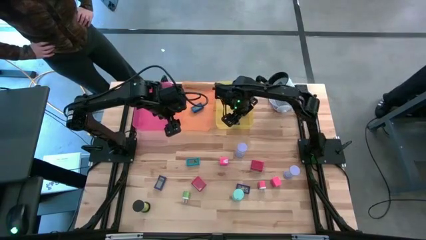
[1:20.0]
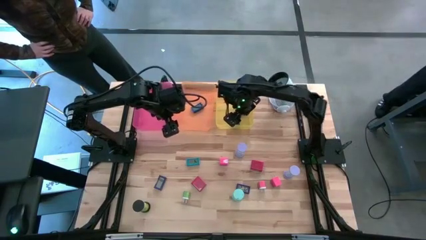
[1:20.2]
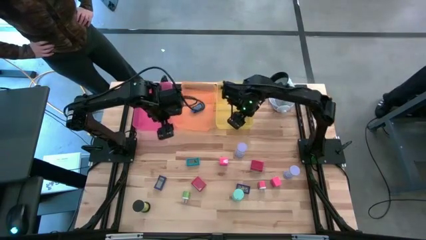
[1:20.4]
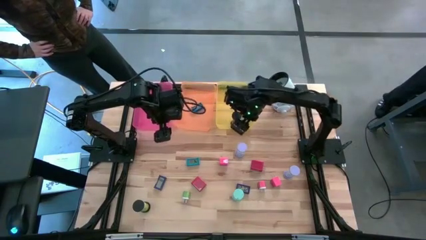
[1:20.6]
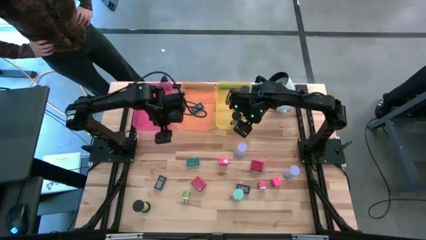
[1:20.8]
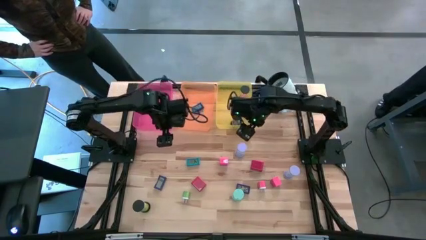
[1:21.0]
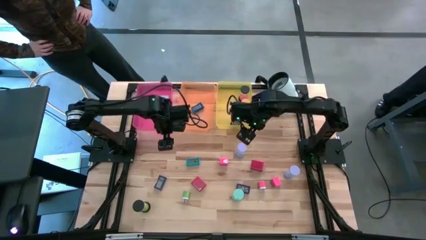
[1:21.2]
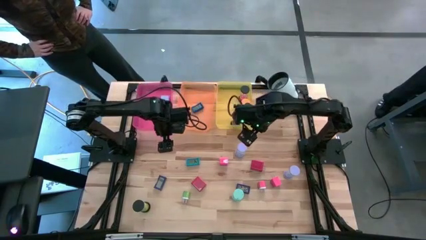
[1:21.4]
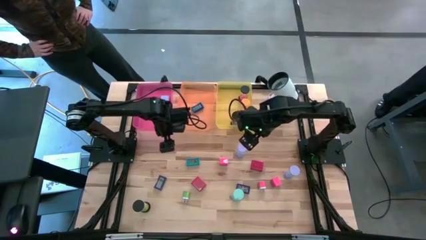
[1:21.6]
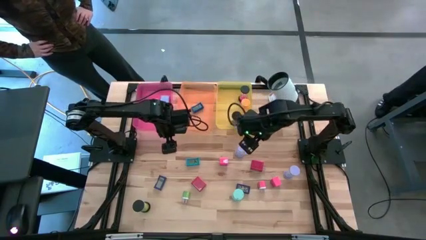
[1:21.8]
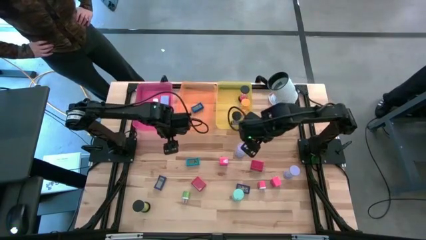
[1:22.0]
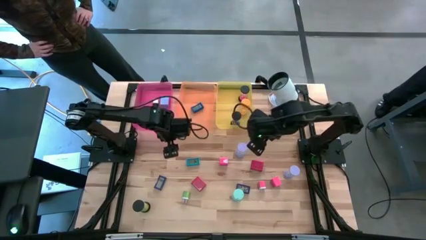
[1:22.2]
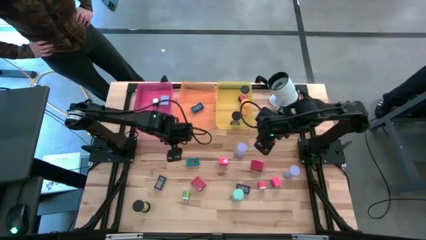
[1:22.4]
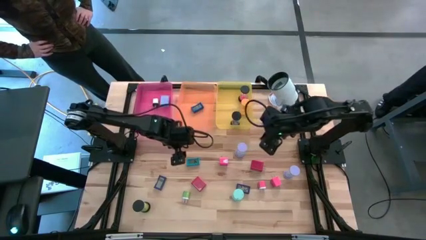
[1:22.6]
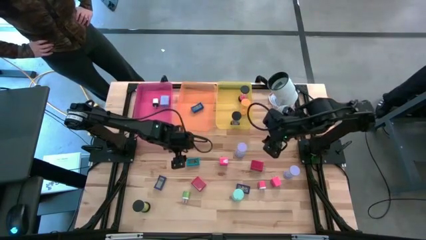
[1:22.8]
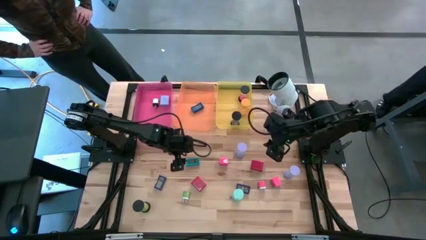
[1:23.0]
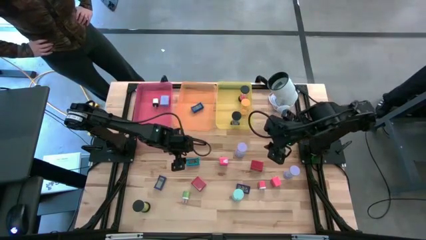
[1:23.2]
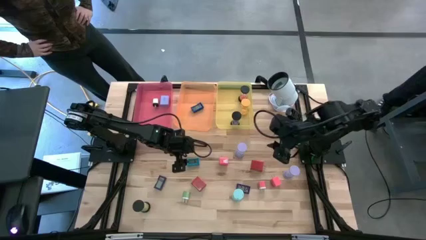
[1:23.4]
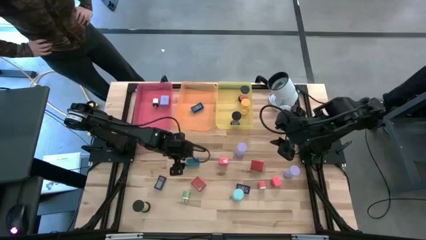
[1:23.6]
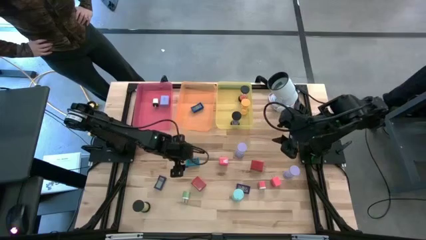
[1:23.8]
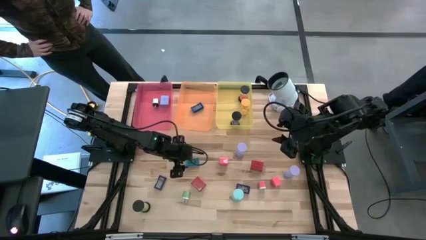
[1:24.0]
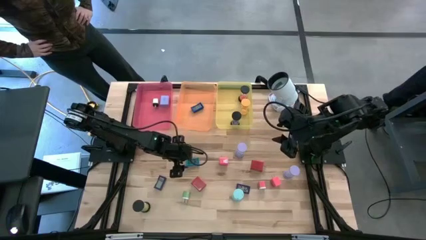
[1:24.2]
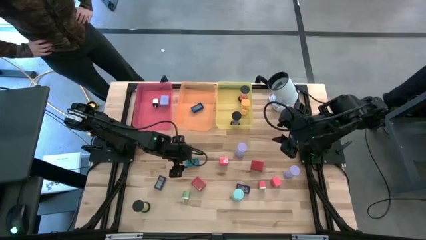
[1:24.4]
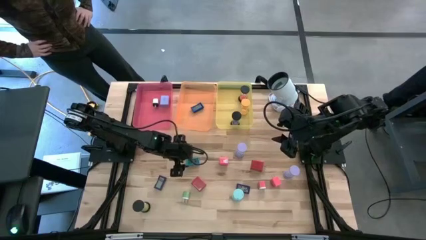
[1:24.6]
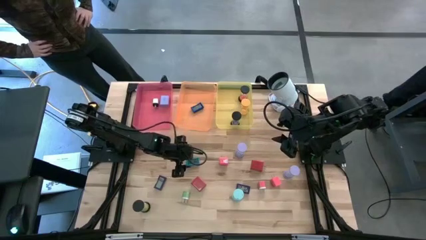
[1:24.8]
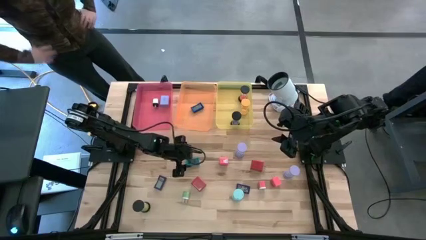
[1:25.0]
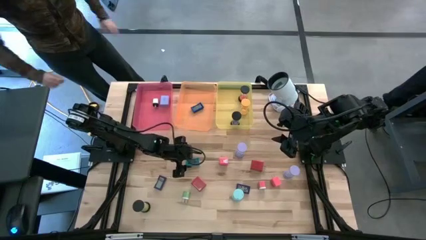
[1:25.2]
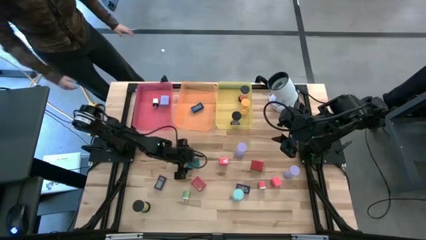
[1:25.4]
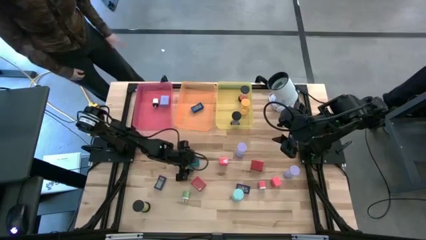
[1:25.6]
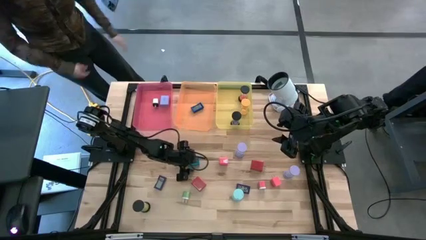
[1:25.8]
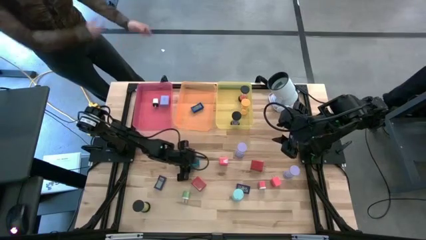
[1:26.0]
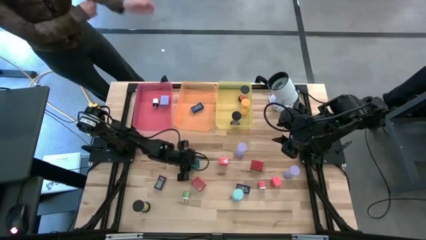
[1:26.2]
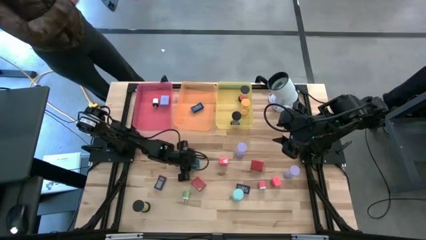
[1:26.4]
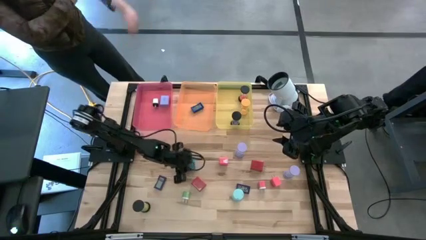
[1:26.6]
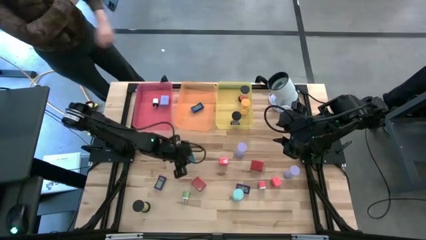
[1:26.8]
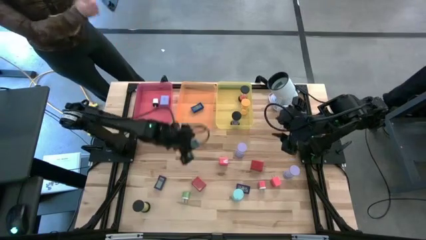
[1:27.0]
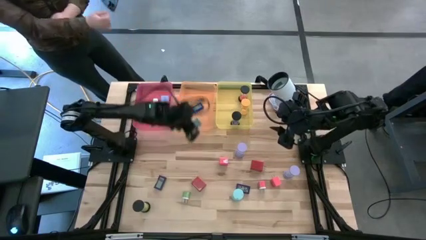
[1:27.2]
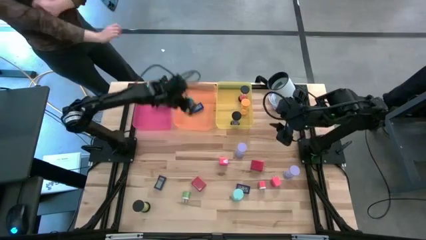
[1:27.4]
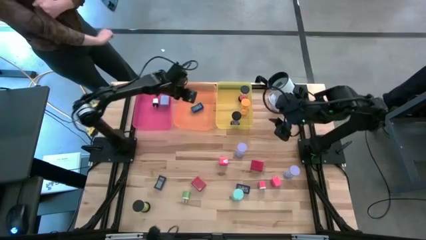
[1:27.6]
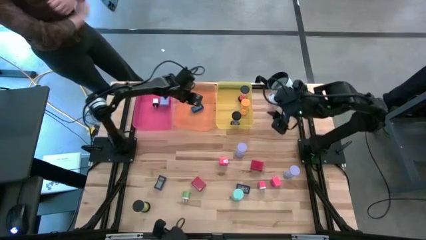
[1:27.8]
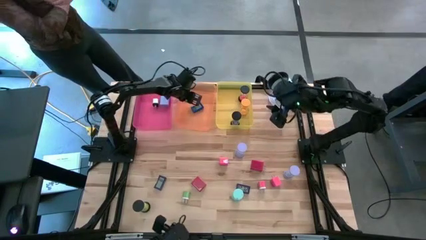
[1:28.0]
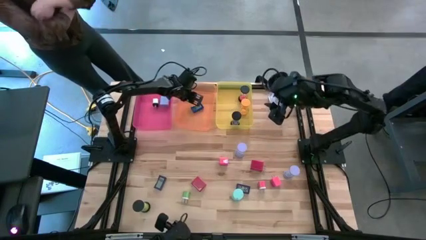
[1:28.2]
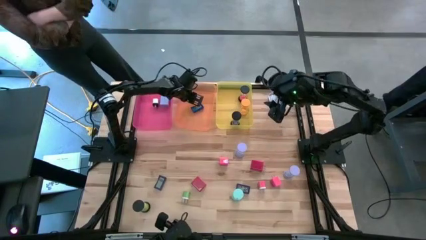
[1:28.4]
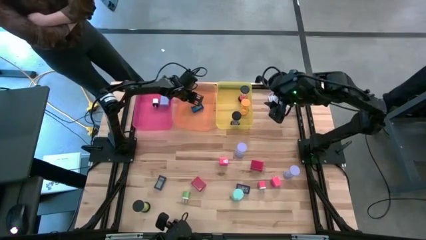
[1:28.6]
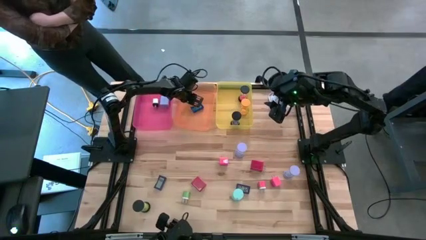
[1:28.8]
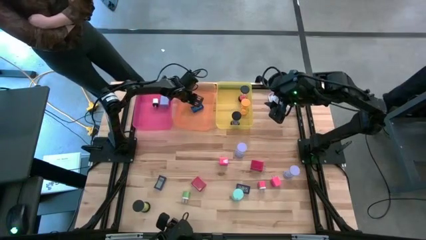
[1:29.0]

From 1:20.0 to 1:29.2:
Task: Pick & Place Office items
Put the light blue digital clock into the orange bin

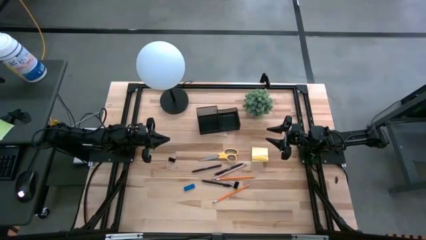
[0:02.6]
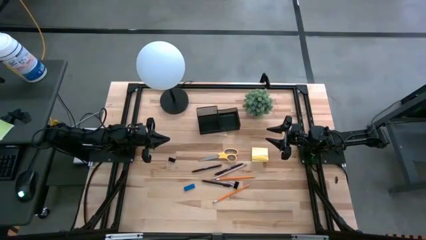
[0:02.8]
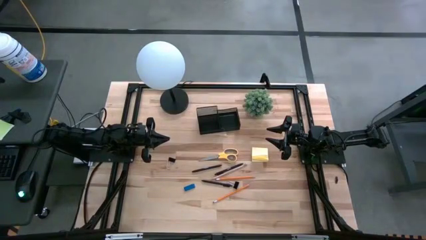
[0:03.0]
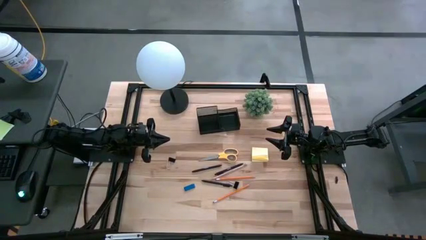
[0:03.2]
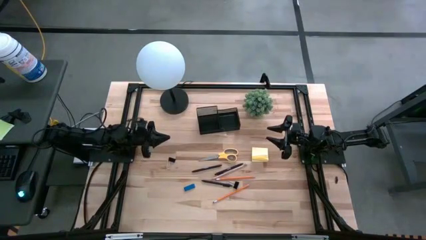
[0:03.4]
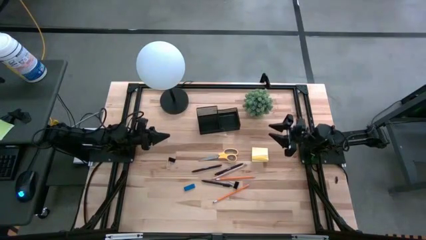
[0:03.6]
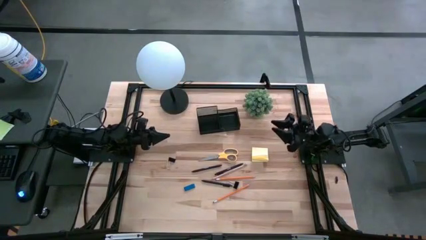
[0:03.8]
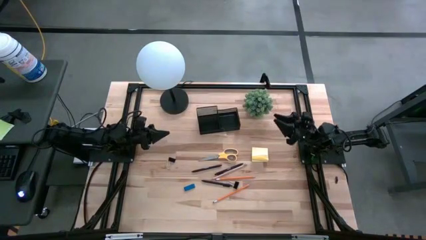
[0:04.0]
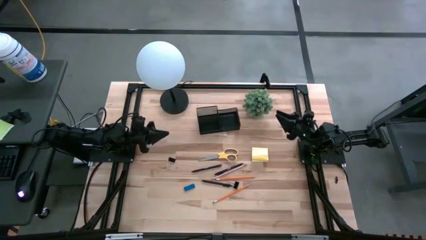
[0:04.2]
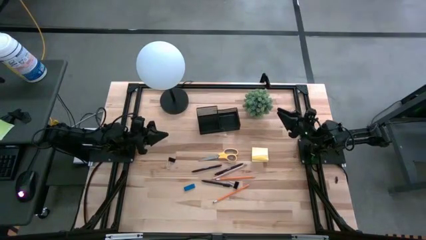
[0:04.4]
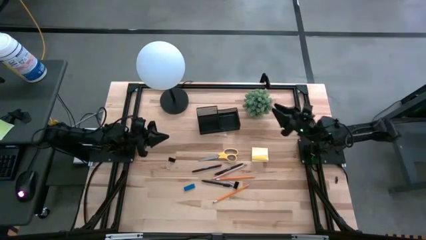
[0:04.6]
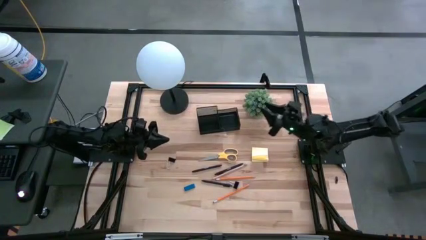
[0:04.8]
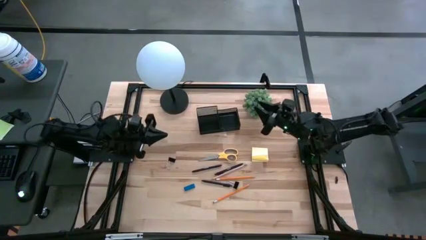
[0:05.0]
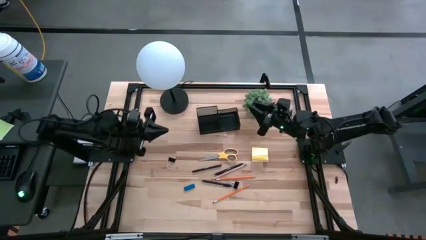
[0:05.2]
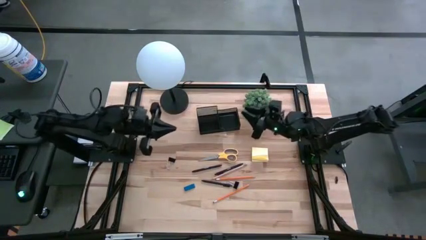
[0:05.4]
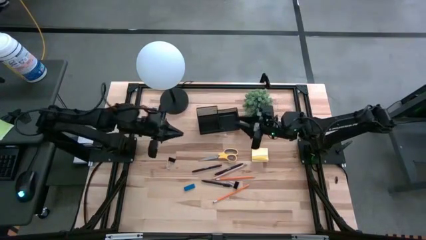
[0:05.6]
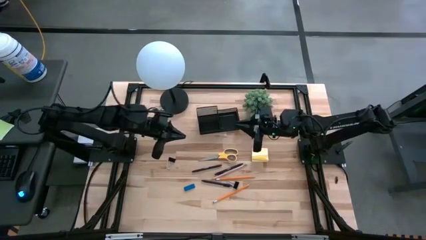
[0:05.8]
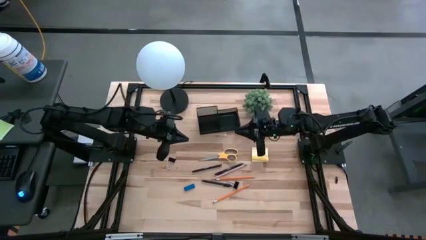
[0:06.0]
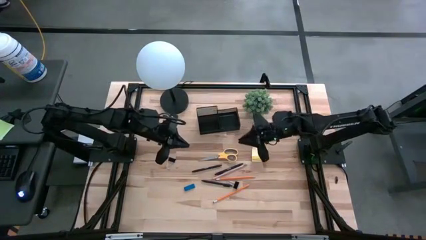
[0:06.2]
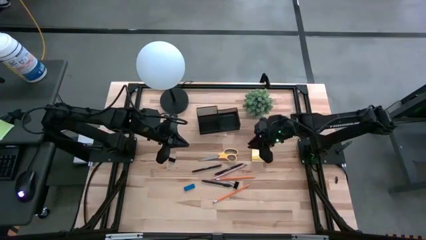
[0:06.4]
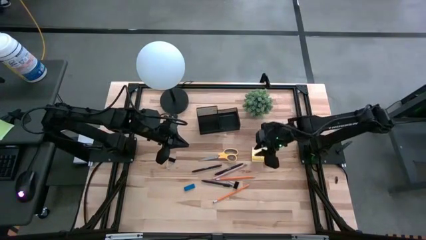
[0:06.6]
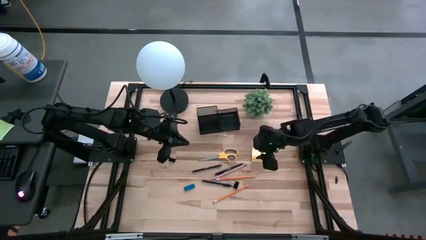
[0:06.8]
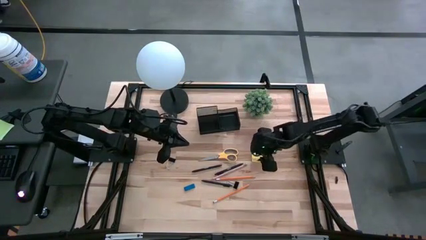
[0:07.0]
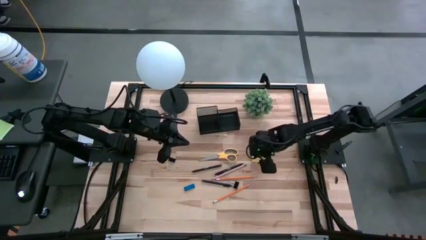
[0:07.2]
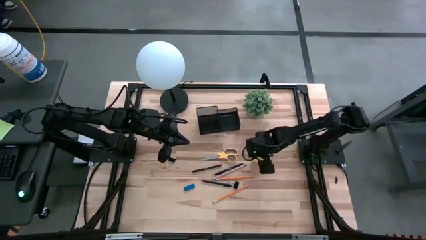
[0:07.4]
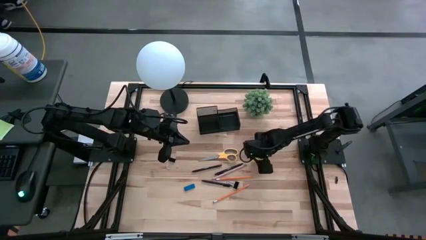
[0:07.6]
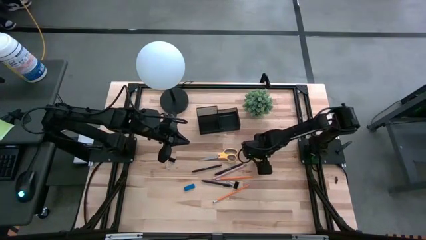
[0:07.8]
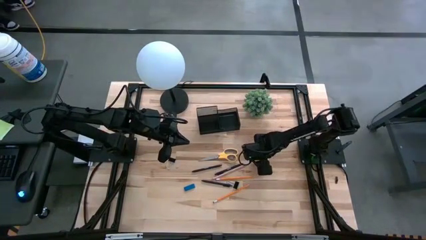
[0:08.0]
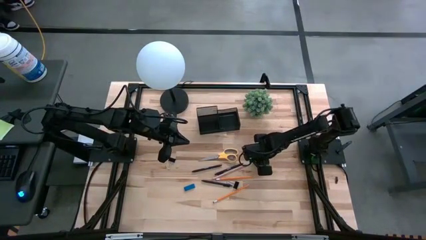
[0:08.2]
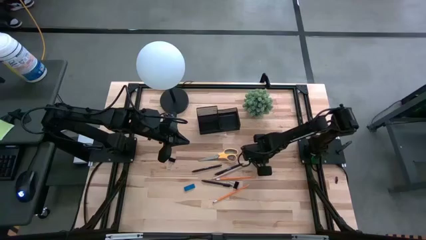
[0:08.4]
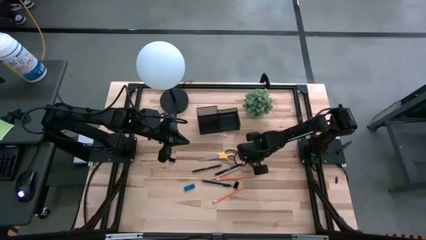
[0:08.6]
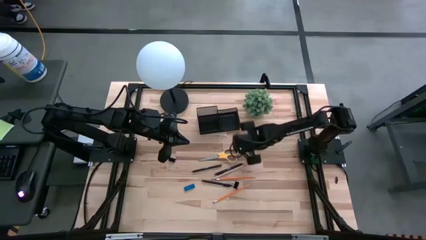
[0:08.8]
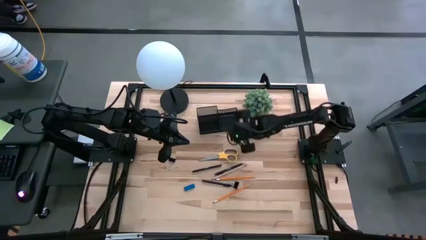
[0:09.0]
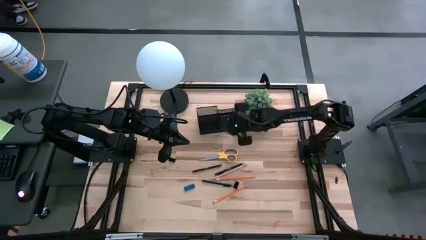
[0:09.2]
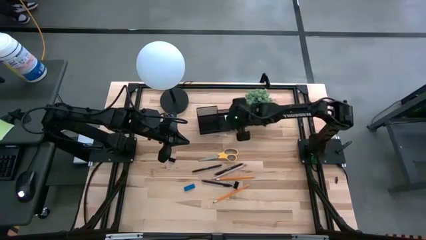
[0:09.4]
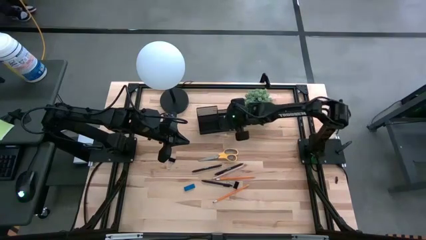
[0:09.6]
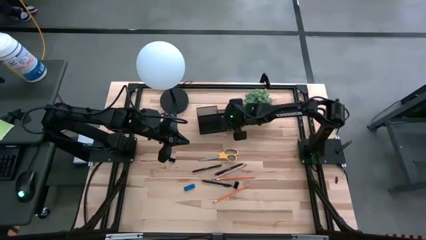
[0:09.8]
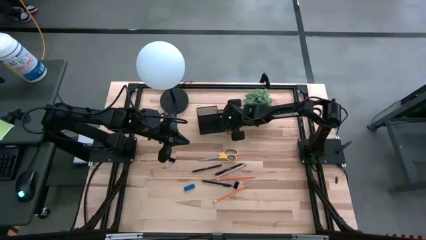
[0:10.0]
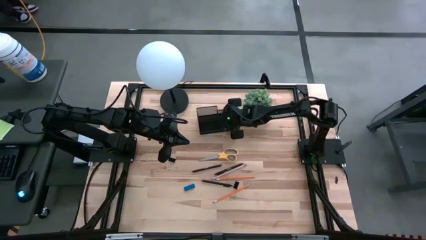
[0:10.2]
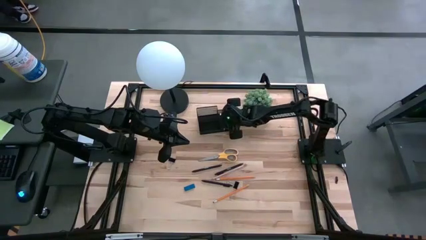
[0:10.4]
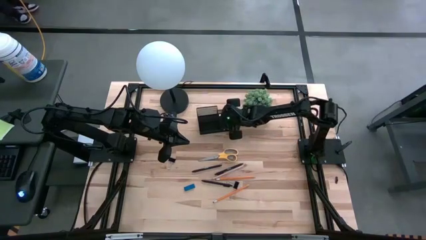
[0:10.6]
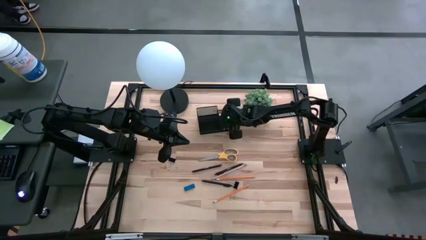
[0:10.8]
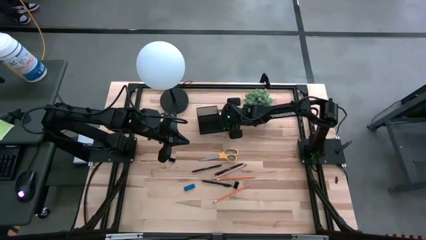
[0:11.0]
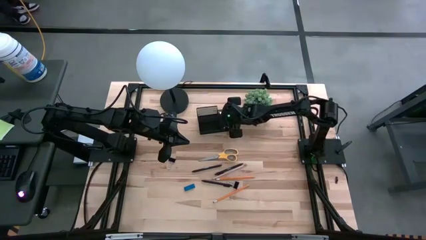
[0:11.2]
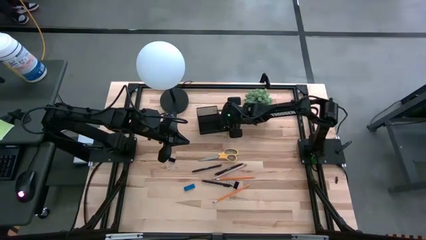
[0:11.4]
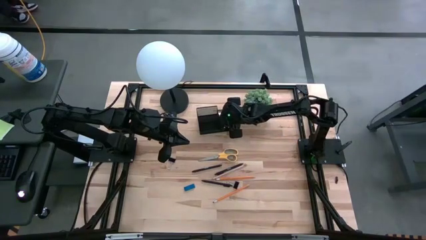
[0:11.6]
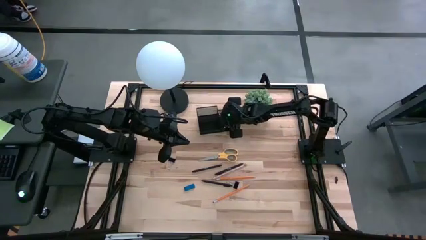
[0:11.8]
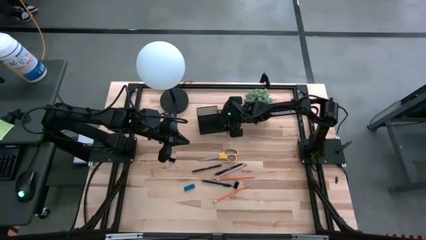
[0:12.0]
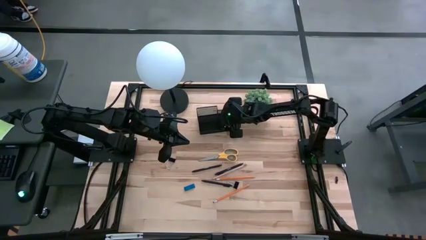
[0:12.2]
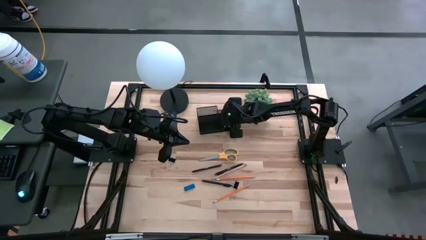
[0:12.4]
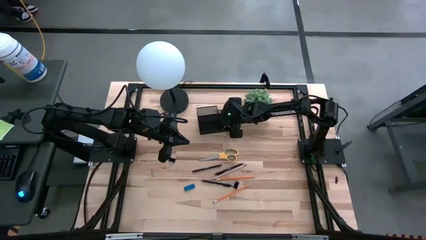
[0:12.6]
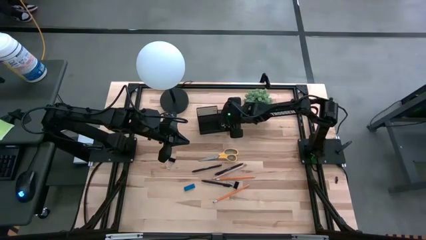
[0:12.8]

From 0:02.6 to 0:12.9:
Task: Pick and place office supplies into organizer
Put the sticky notes into the desk organizer
